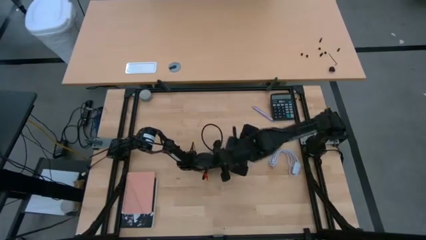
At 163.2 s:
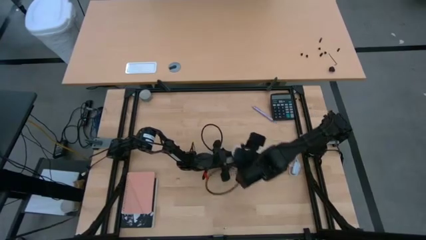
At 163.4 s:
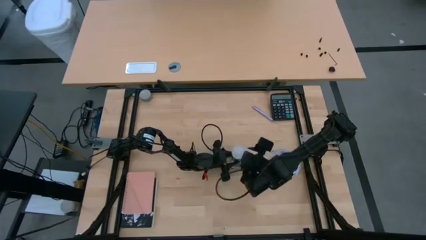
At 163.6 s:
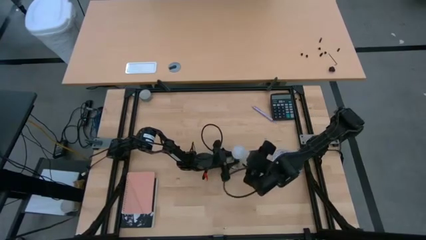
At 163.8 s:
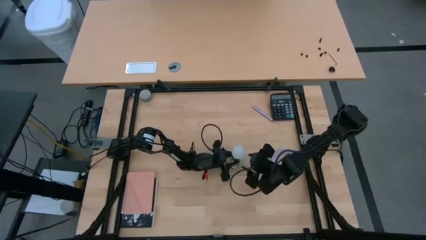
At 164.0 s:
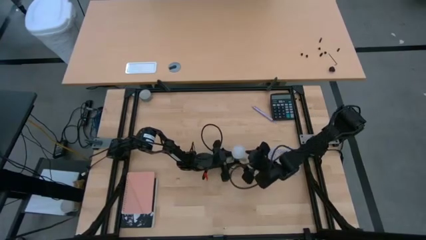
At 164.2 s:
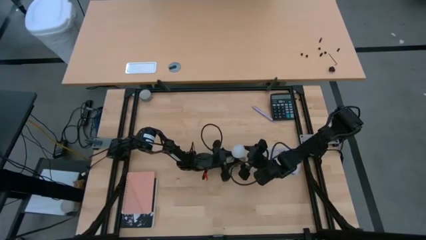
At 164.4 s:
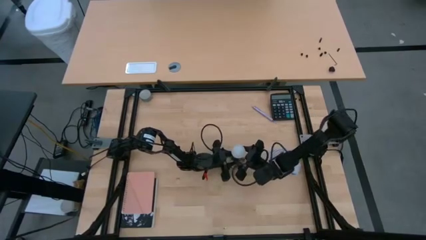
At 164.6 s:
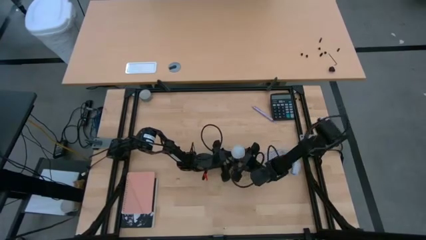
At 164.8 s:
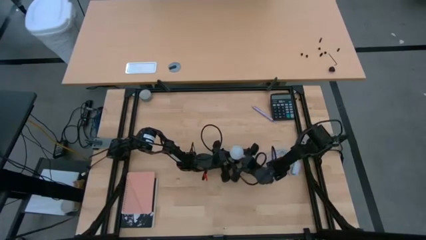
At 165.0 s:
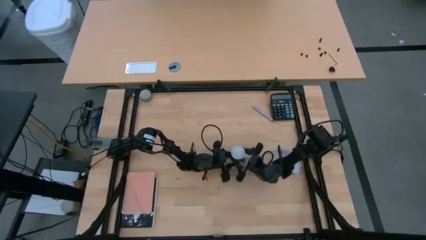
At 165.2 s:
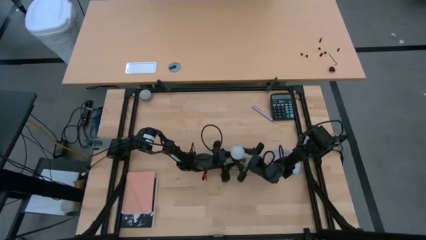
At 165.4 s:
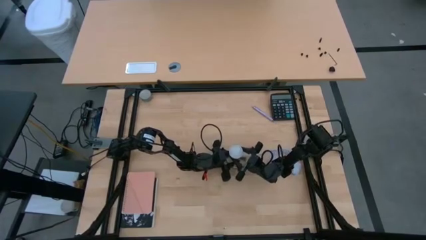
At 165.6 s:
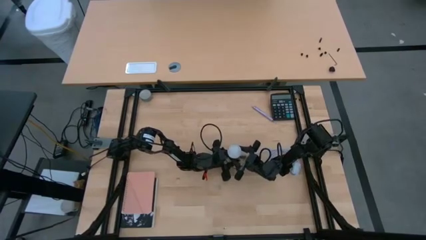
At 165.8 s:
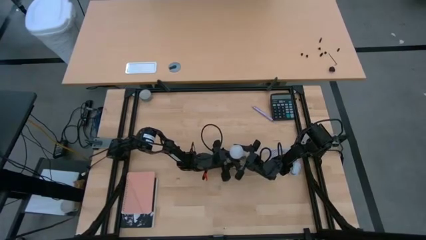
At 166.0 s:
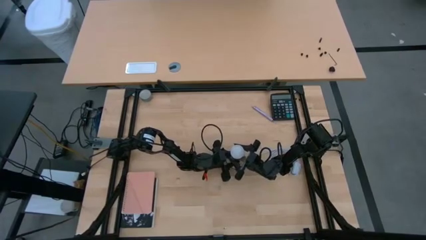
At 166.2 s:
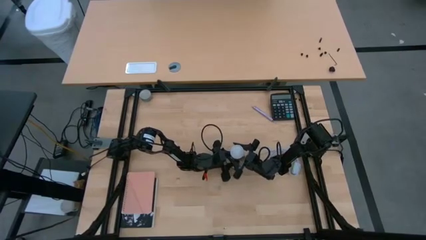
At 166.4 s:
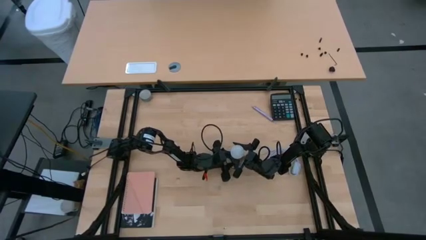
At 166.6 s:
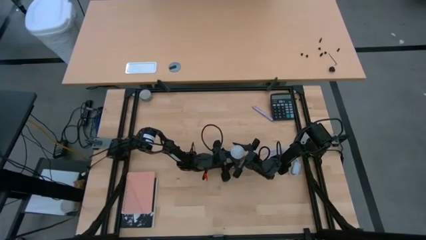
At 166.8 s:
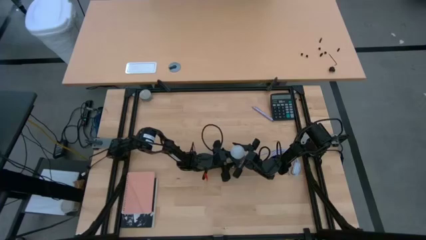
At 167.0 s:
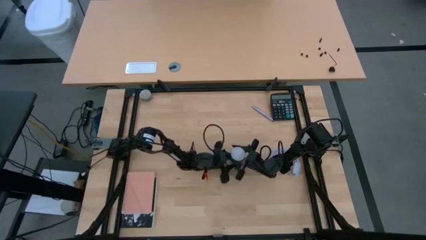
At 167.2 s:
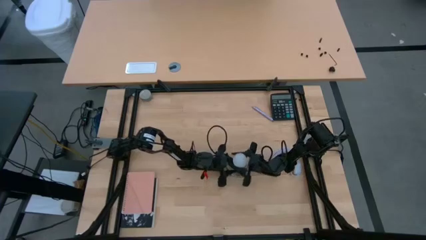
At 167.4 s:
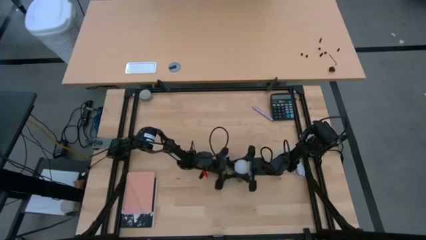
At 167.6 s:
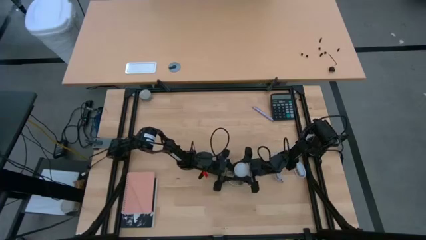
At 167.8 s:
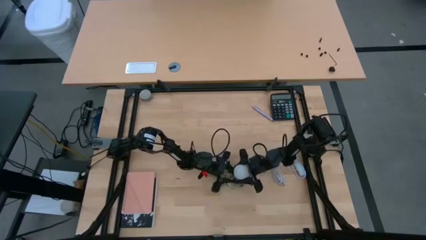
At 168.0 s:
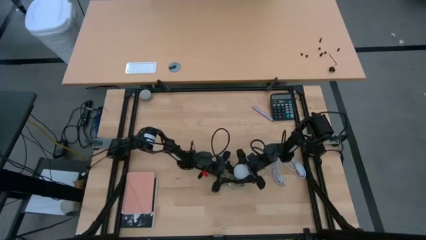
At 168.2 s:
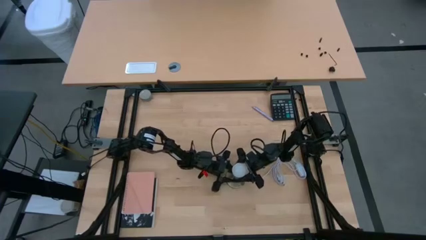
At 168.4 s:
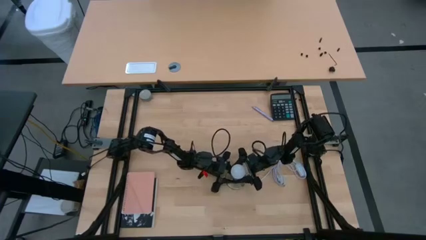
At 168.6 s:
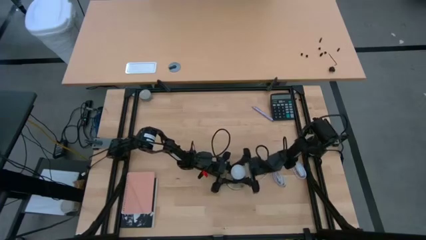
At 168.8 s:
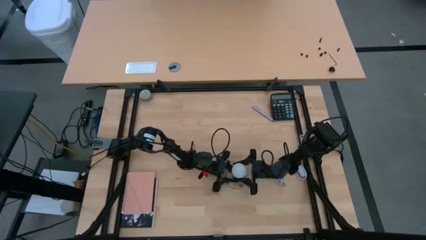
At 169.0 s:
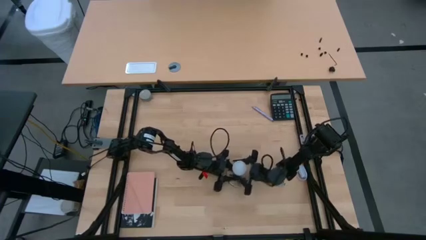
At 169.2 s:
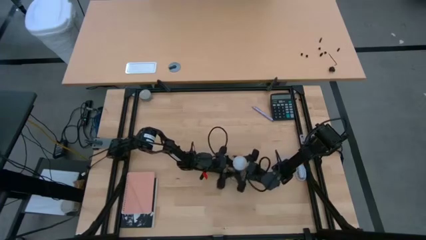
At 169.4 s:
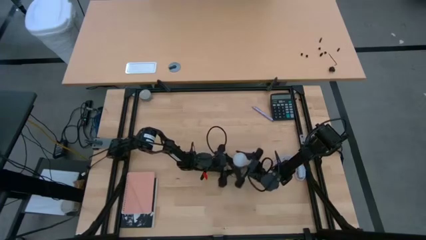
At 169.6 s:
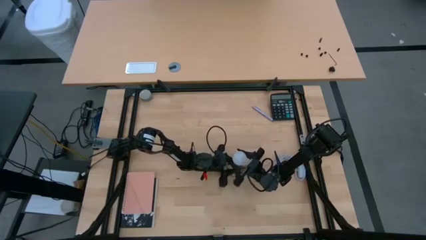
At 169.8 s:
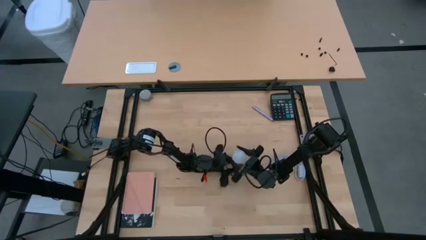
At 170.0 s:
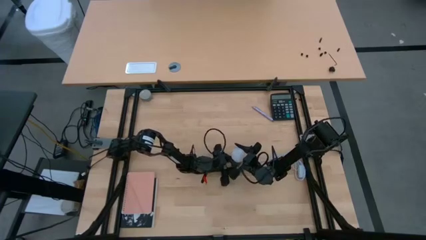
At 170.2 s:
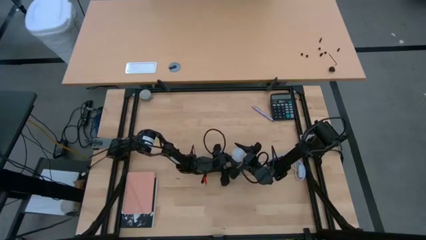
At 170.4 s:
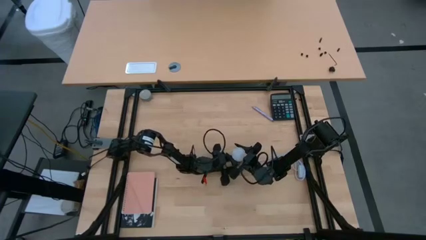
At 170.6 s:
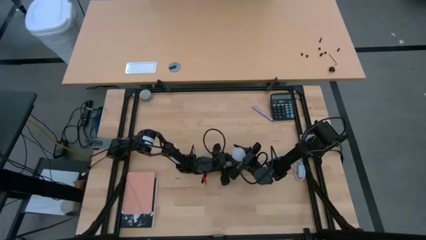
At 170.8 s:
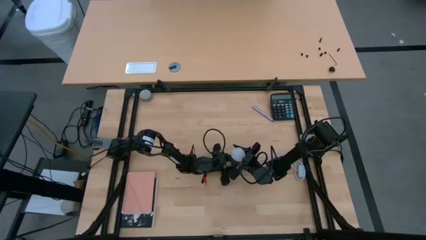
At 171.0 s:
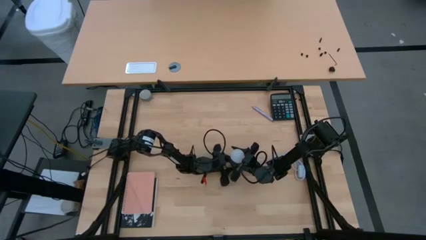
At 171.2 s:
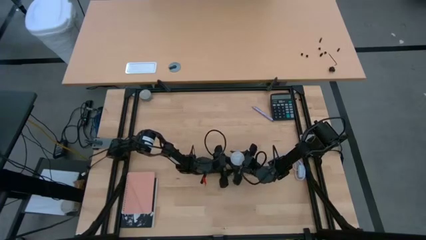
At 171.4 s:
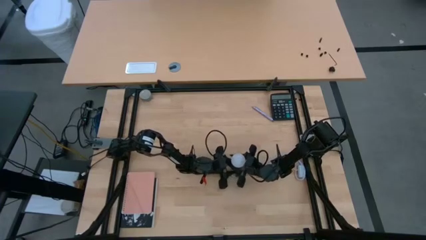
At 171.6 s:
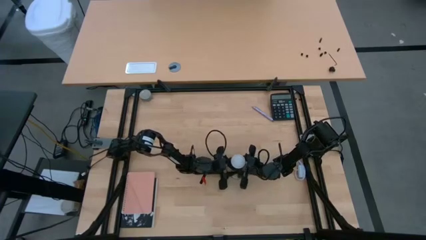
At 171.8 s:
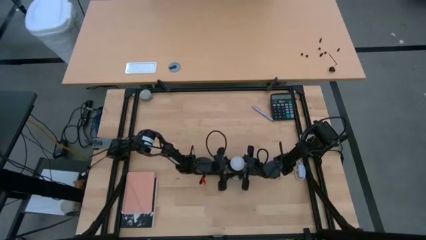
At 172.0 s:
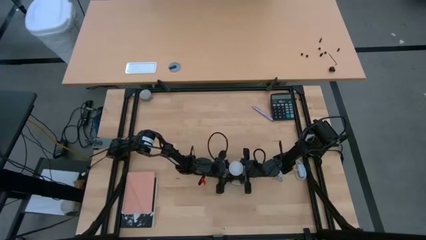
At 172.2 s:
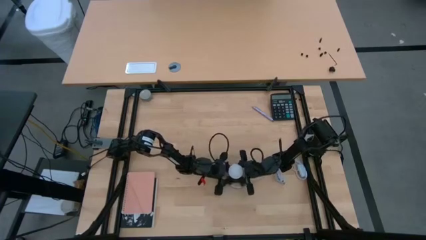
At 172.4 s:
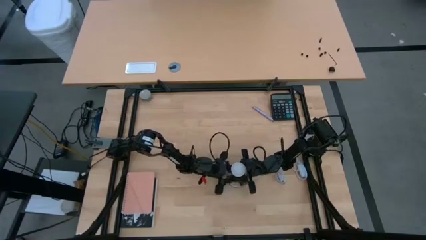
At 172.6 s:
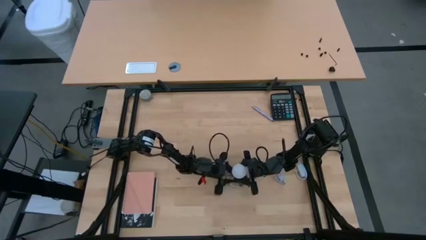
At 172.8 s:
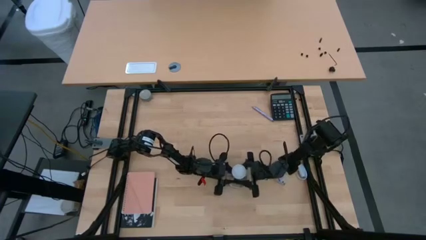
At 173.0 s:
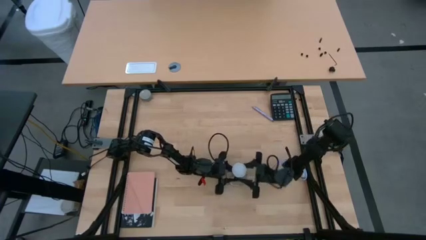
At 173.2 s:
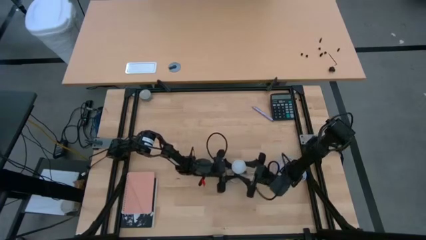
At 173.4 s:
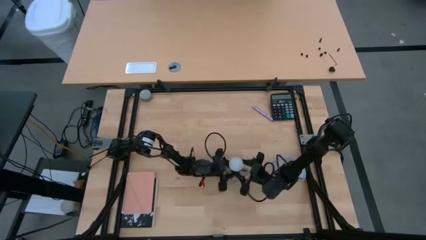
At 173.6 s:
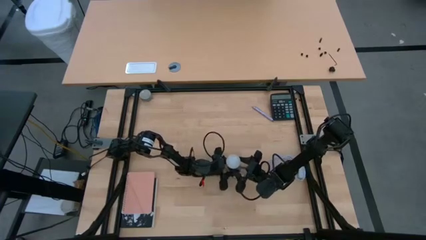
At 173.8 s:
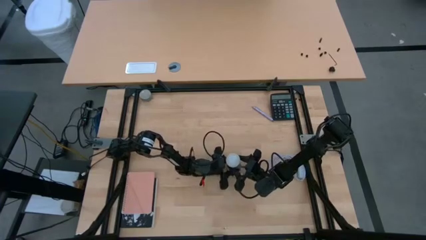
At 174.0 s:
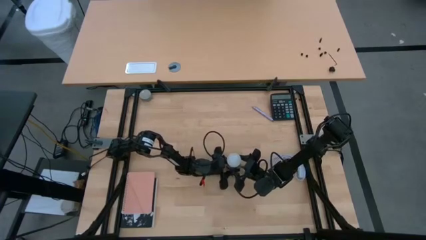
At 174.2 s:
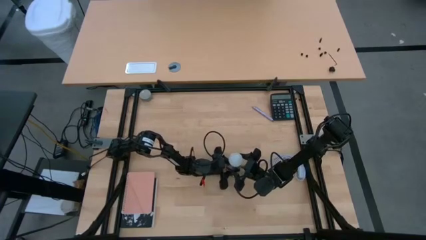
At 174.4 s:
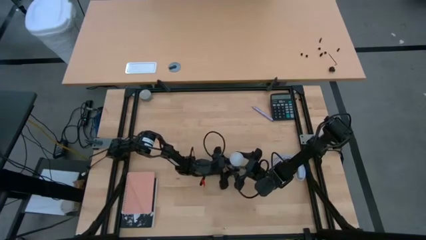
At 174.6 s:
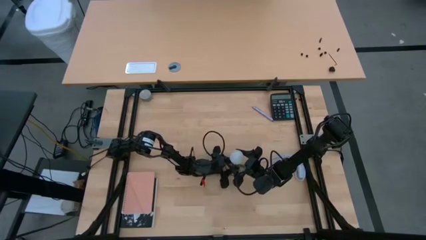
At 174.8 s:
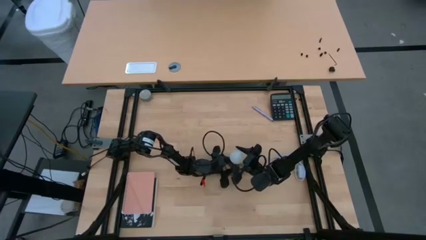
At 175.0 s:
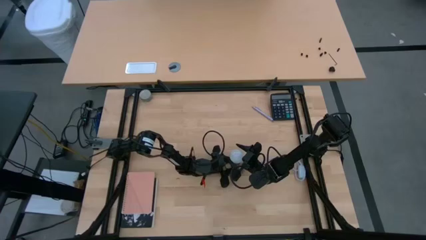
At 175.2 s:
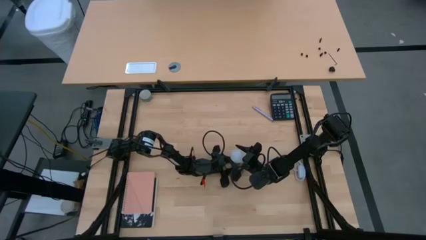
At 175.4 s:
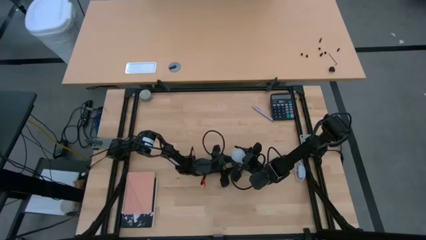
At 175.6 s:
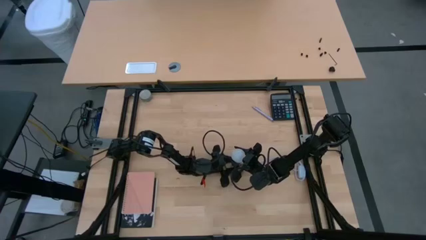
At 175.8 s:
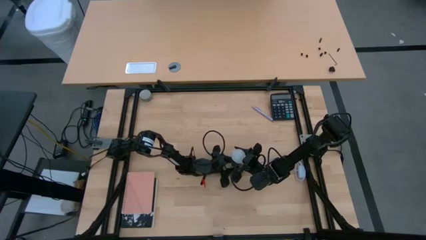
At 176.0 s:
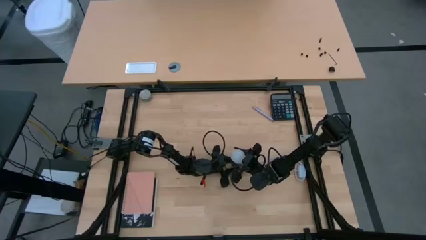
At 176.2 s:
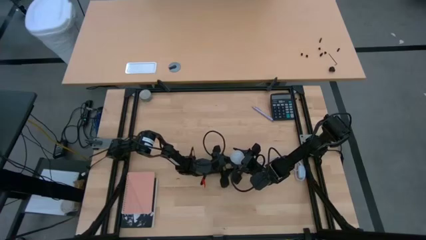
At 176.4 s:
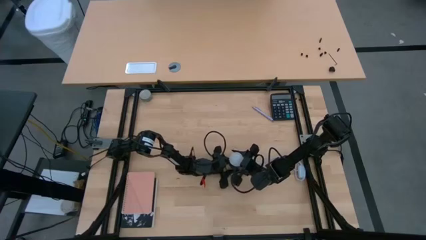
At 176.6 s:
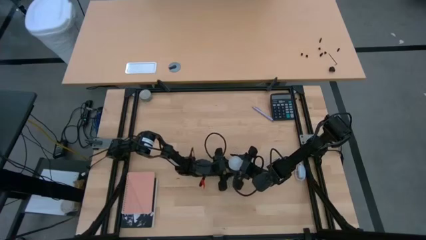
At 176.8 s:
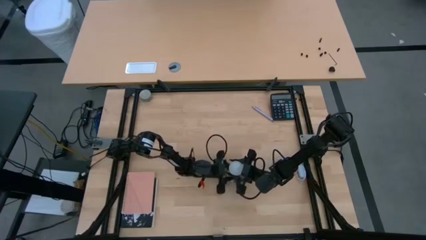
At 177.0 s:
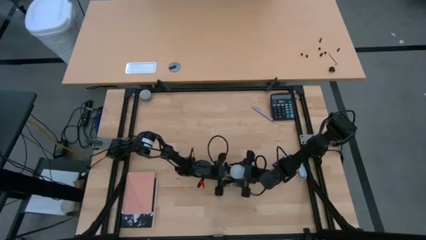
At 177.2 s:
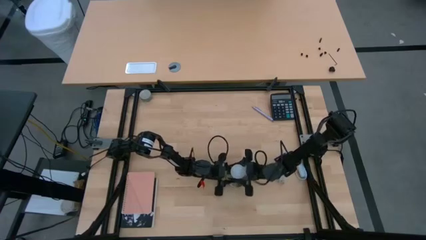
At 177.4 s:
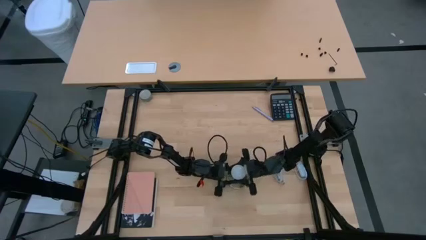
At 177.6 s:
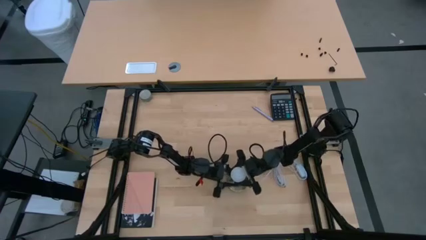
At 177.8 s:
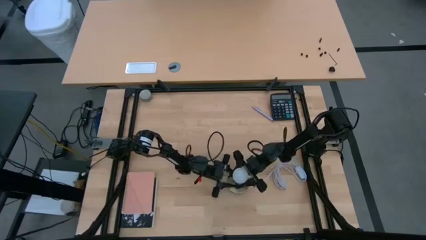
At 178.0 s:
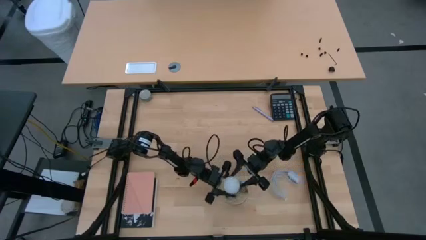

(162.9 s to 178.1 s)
Task: Screw lightbulb
Remove the lightbulb from the lamp

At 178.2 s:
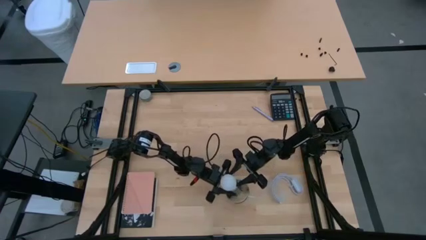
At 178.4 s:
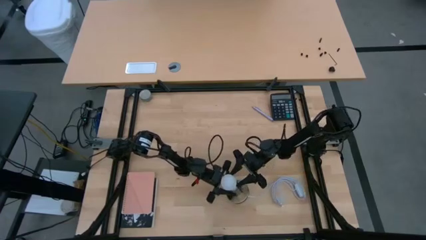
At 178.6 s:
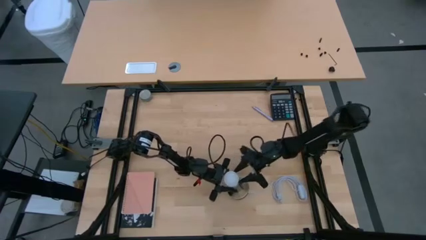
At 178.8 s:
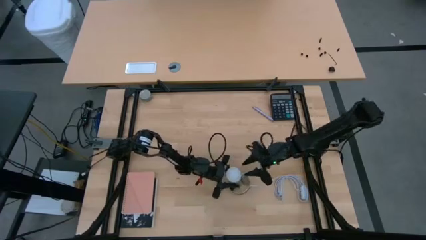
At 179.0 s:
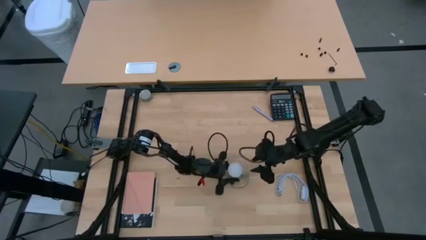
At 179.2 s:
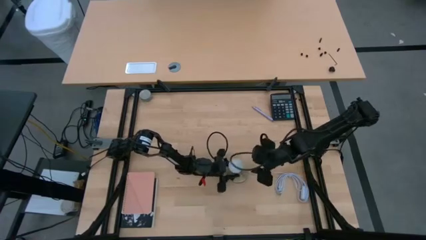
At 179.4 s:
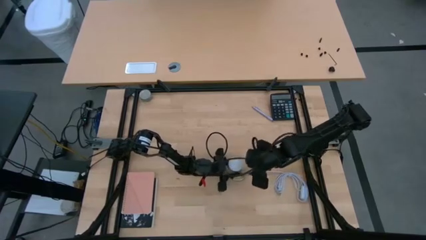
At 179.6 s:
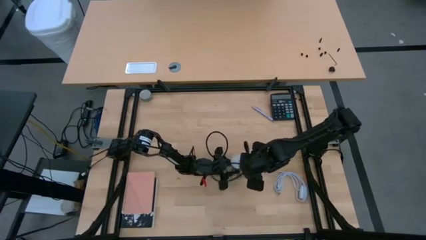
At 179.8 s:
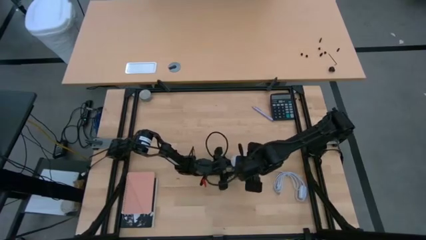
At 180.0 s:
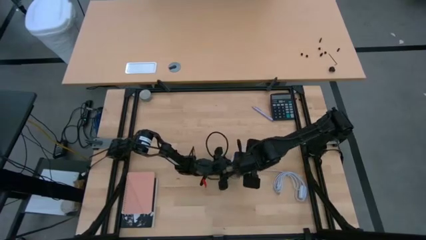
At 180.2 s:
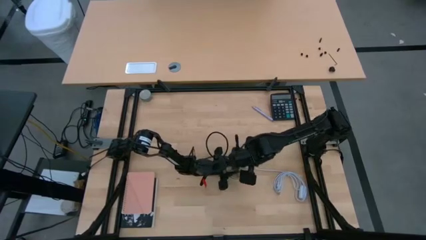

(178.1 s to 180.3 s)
Remove the lightbulb from the lamp
